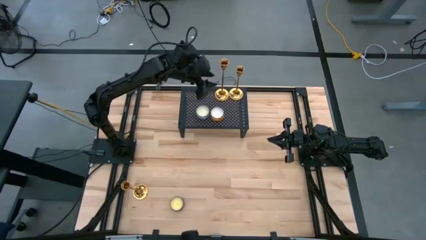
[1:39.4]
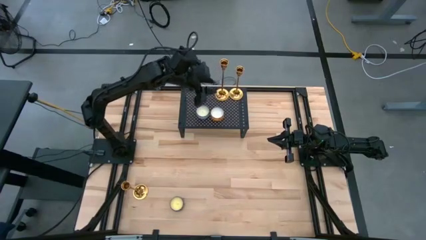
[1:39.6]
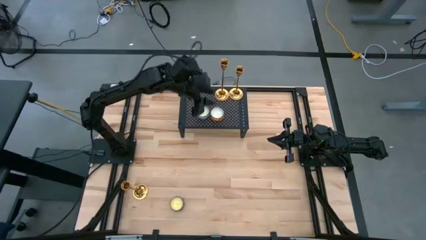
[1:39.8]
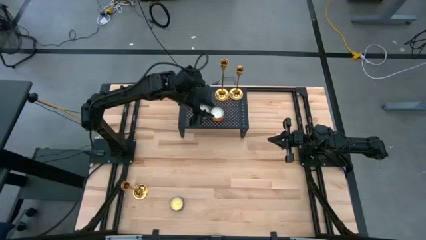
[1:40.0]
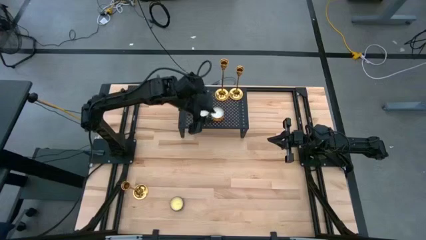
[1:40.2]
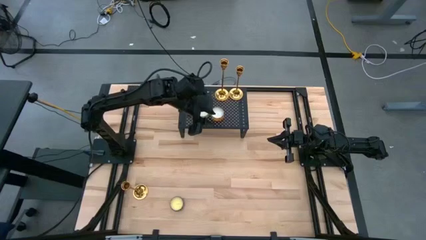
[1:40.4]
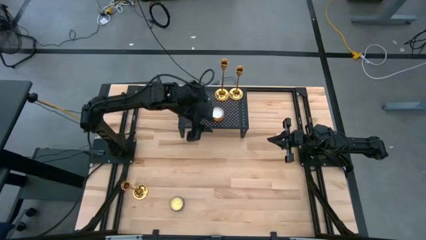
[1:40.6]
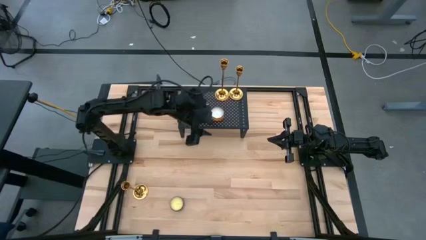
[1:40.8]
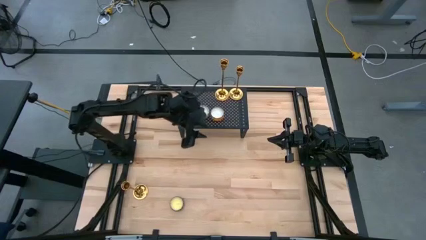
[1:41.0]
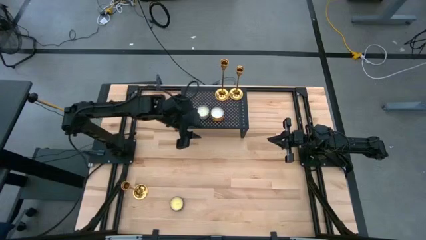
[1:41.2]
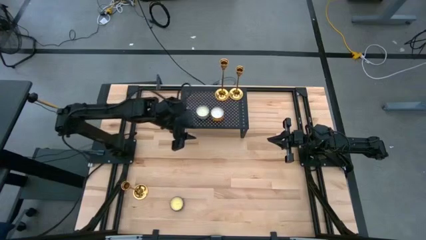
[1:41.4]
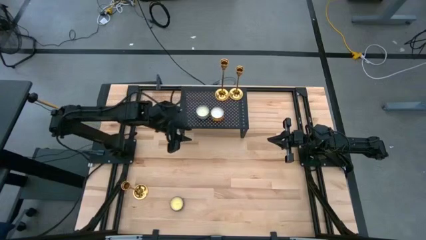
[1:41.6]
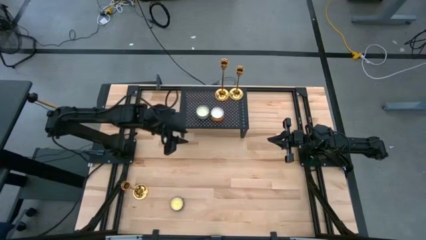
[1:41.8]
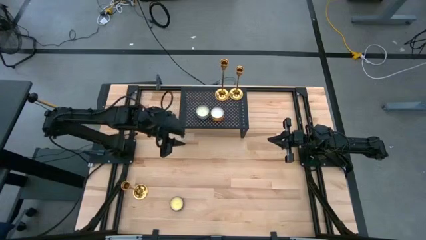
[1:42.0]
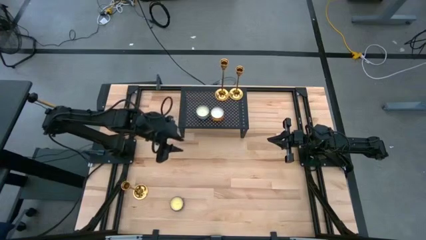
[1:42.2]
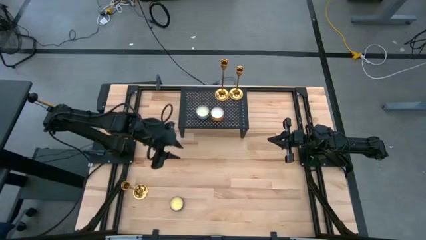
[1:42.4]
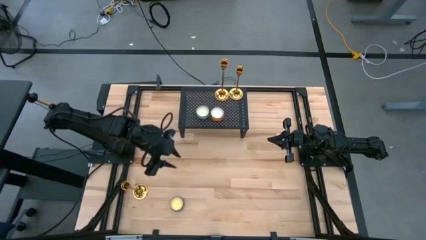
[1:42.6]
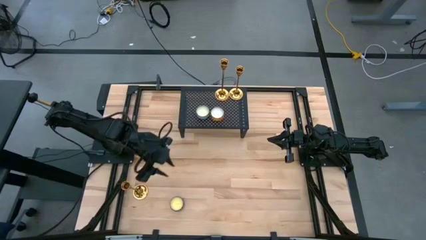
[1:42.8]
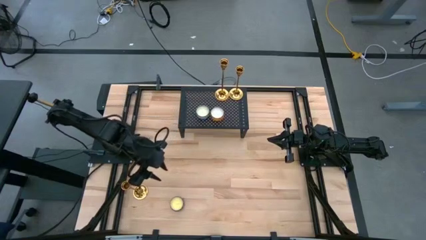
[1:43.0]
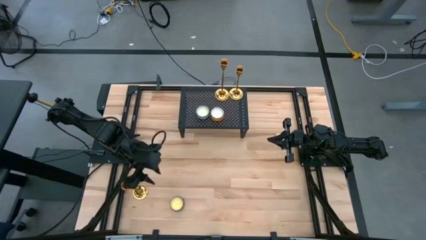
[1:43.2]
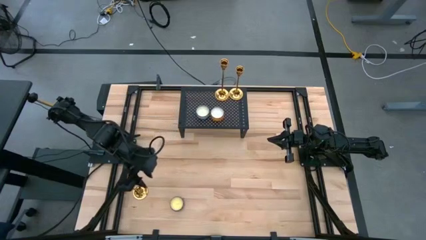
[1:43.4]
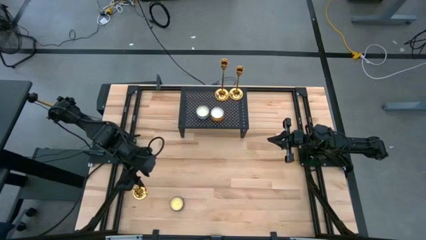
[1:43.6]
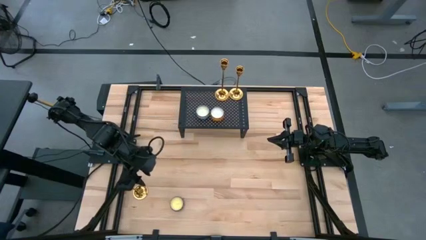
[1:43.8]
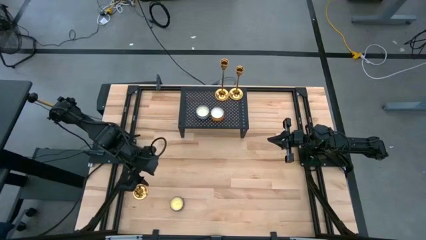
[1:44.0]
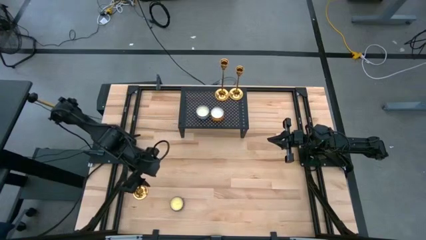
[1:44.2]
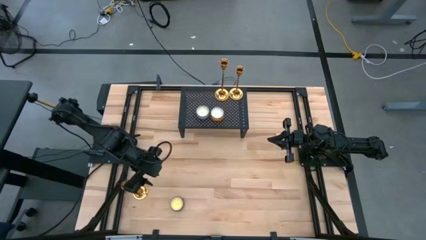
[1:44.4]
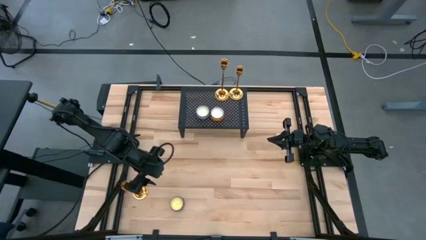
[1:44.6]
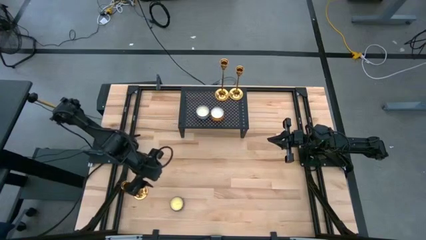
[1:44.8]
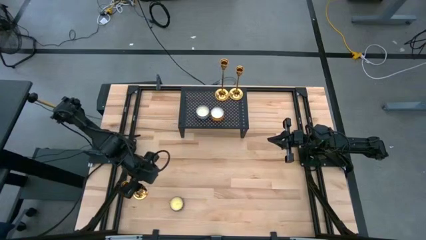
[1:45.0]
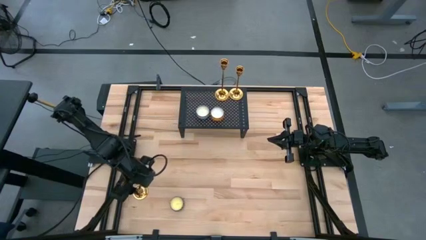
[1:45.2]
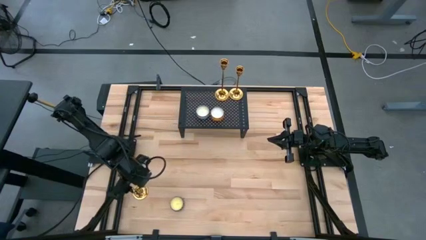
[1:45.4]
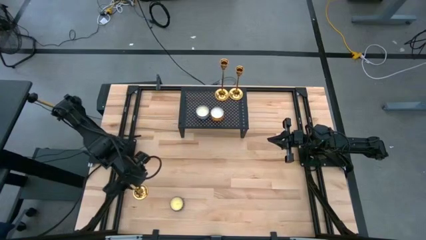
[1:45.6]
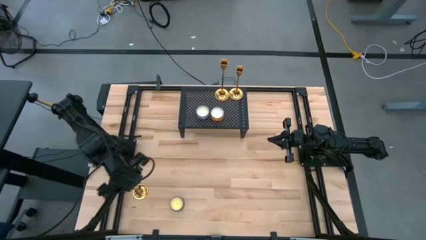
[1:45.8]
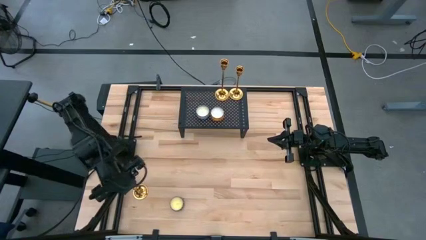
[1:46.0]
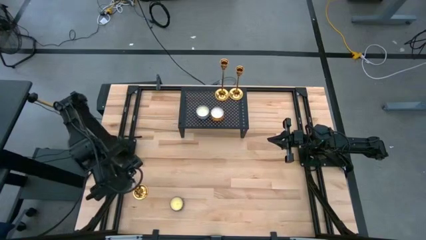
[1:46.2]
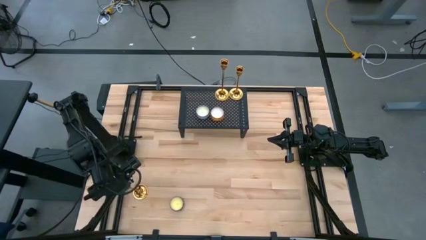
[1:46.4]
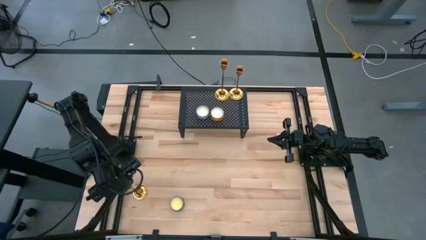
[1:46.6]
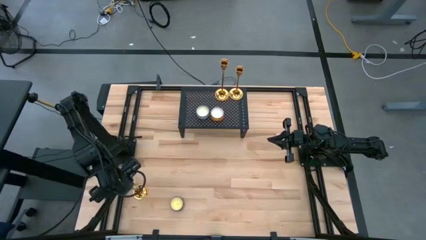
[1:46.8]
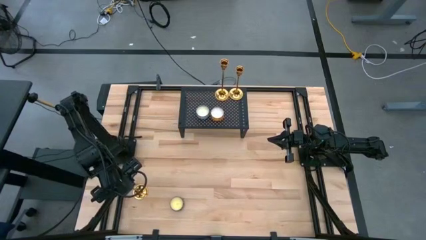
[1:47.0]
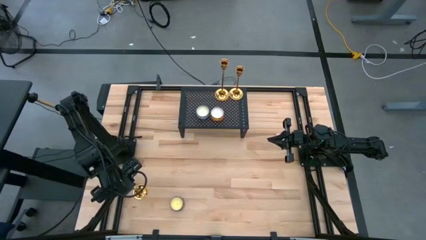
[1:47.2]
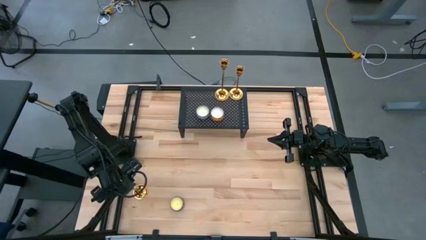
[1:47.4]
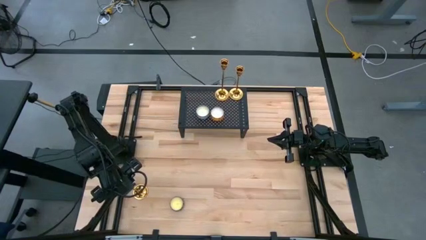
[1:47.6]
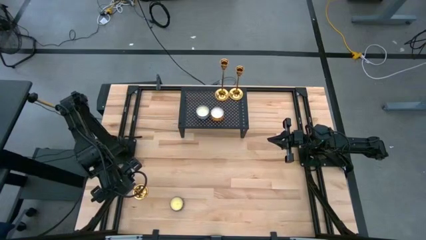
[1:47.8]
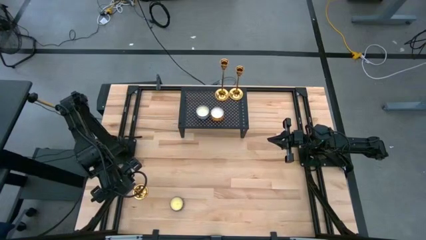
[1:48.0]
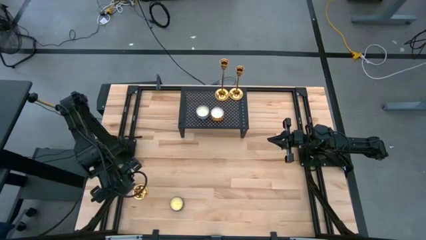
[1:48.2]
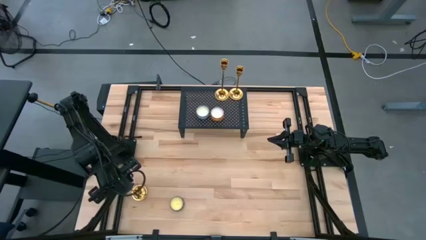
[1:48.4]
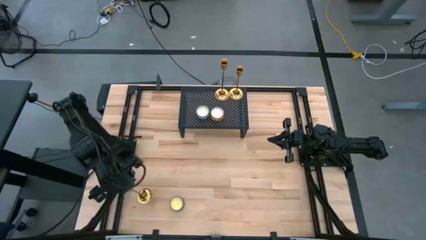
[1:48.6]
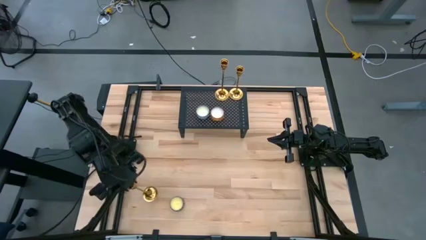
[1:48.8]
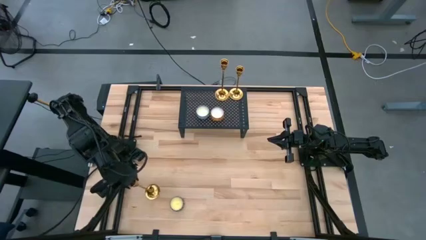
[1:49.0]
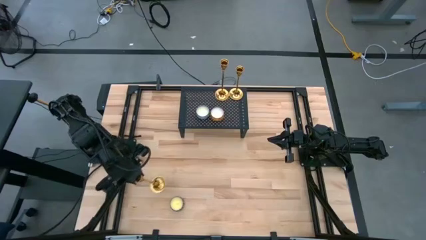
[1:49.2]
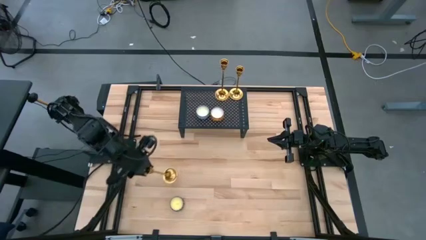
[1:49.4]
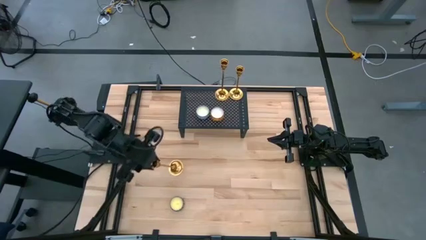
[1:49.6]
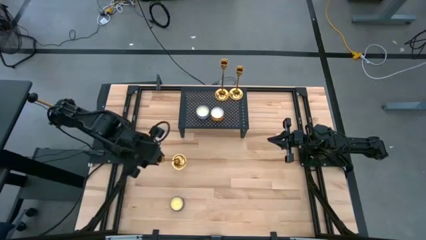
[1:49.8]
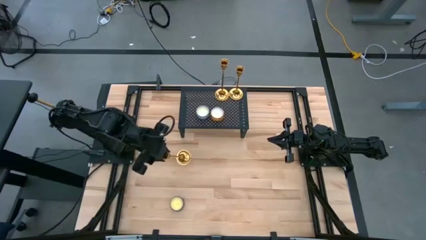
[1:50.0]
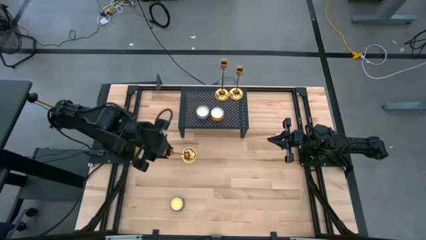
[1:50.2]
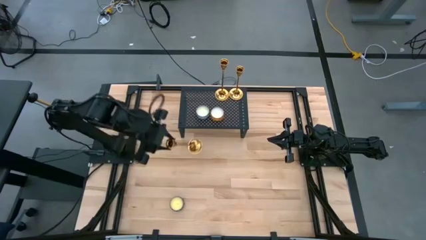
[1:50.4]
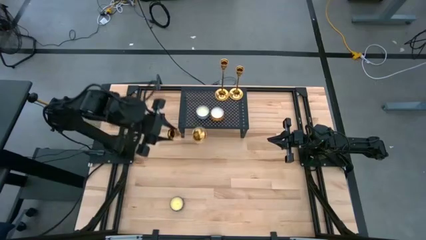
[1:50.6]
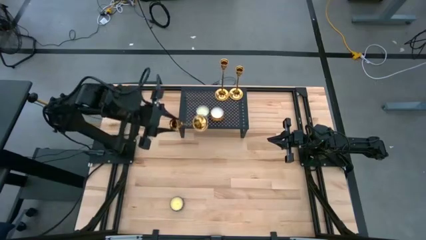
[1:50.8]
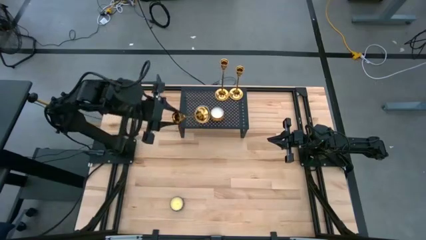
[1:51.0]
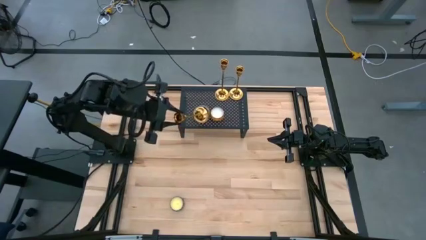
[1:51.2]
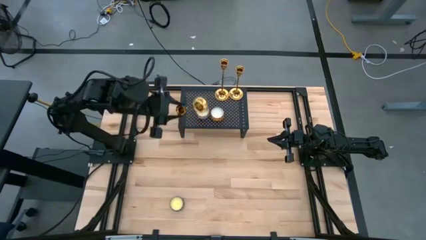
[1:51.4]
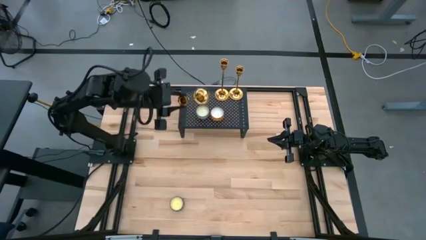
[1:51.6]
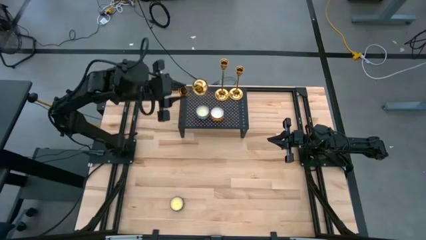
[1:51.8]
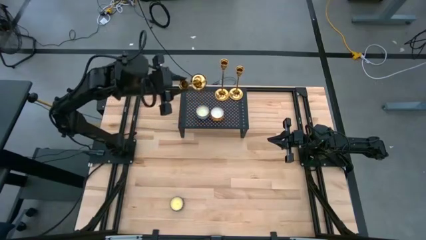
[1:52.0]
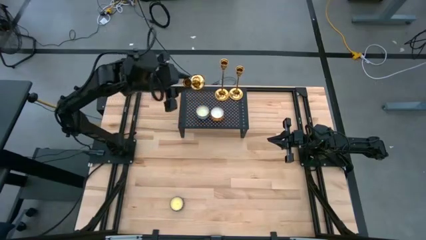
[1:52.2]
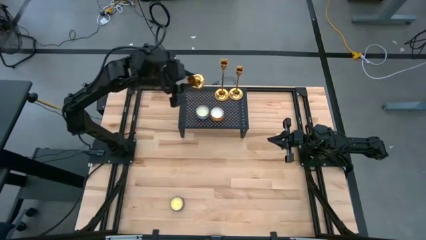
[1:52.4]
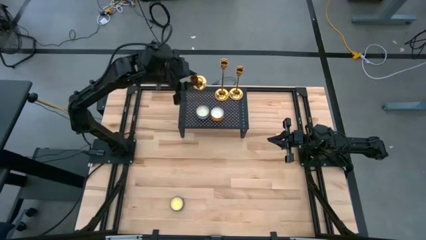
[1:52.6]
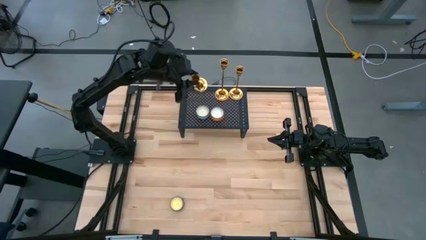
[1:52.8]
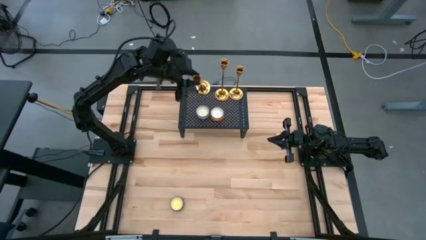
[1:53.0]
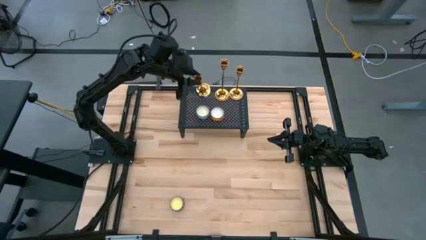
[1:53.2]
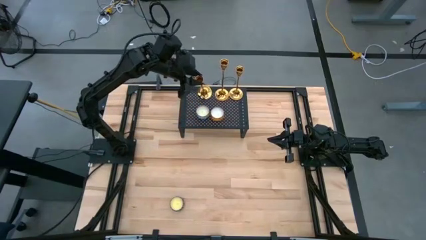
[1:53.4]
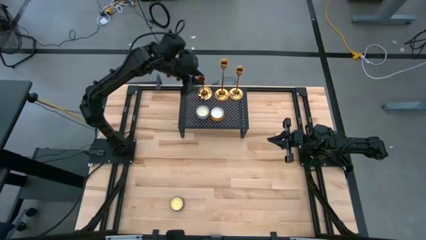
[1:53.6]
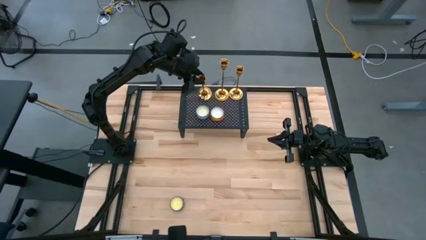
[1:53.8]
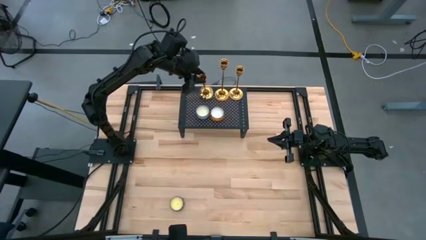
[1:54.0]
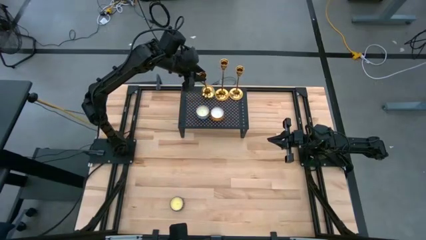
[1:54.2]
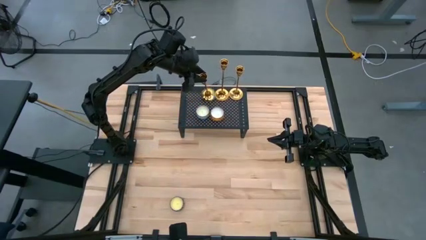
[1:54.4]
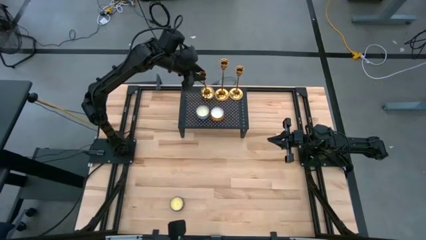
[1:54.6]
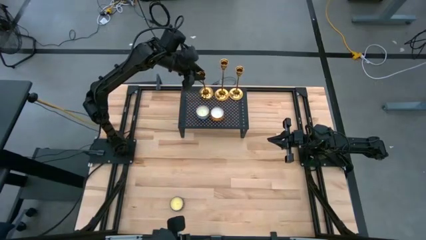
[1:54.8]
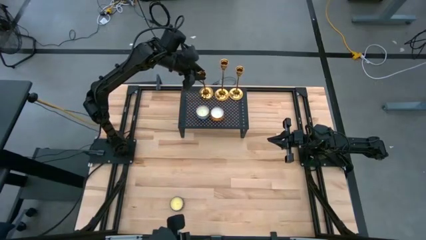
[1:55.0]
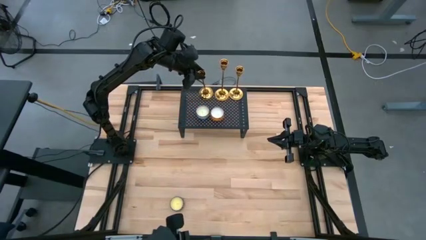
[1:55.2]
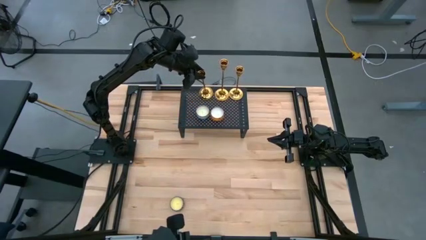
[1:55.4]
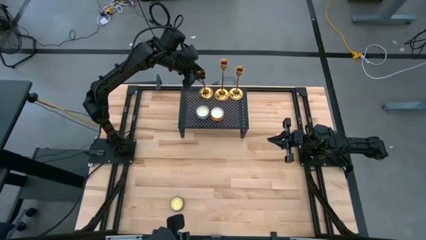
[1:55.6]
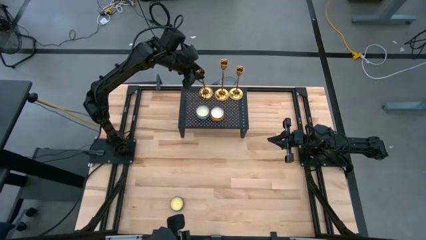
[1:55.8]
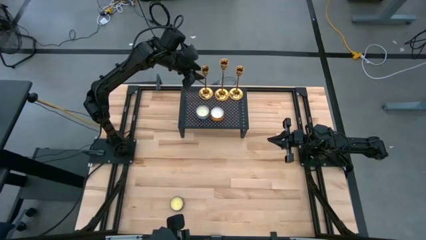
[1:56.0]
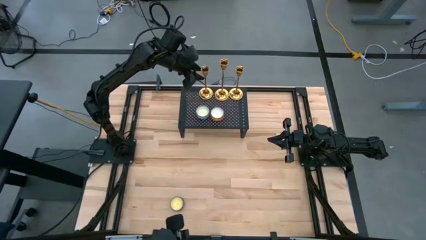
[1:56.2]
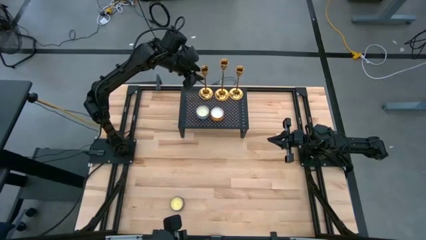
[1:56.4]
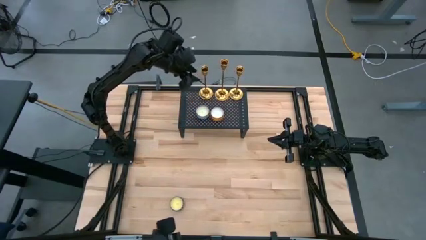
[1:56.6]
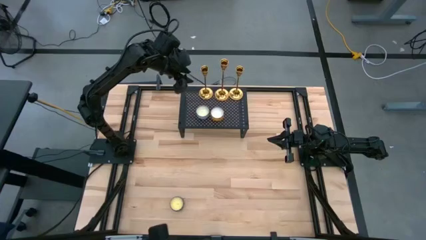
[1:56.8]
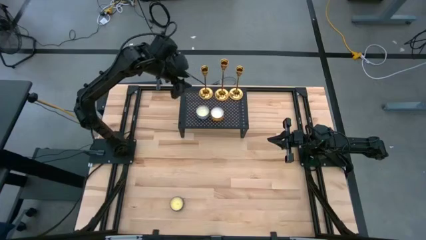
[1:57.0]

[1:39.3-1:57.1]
Task: Pick & Place candle stick holders
Put the gold candle holder on the shelf
